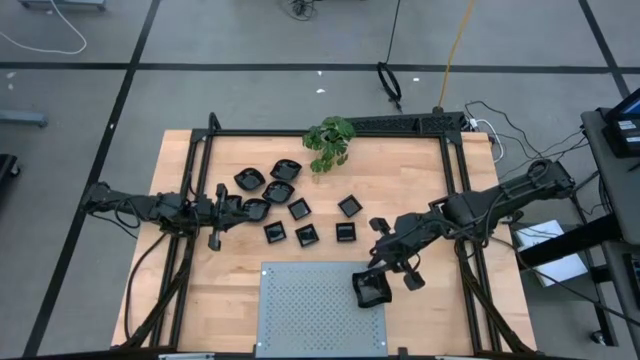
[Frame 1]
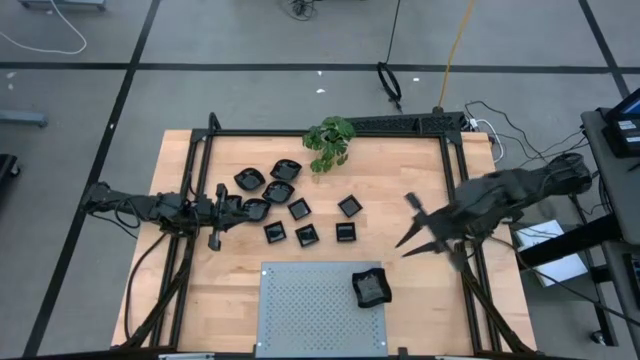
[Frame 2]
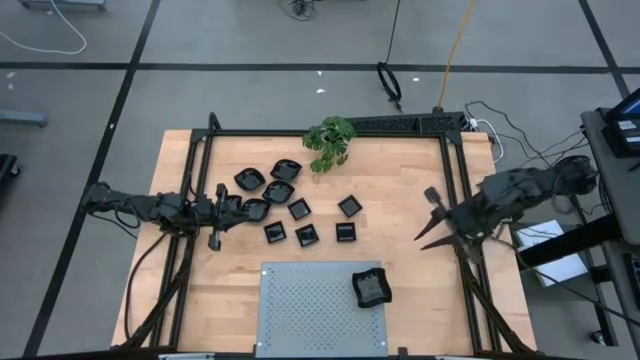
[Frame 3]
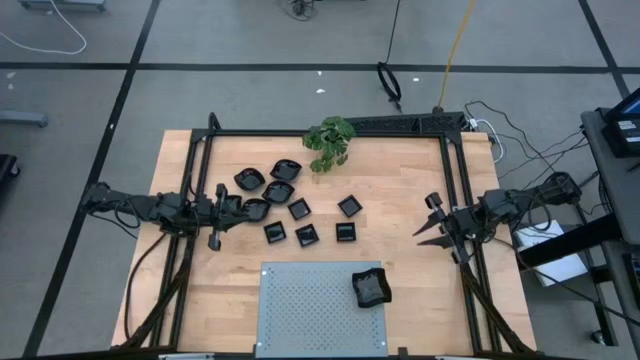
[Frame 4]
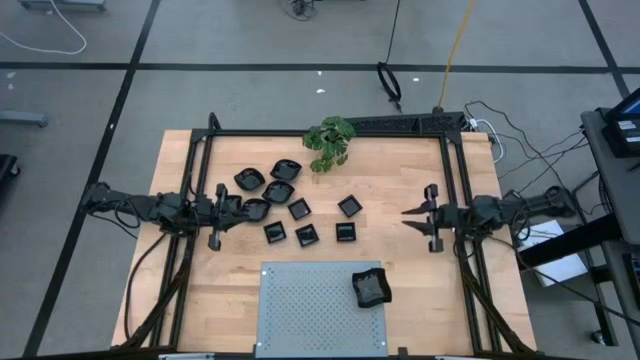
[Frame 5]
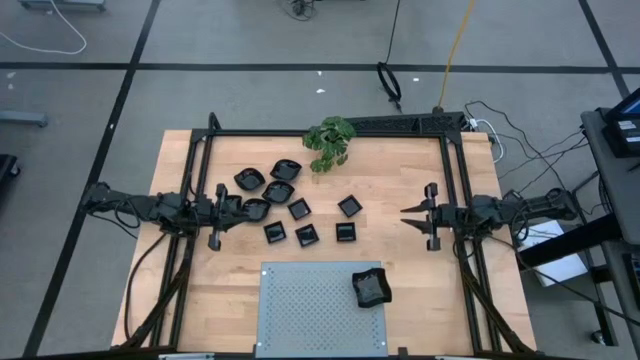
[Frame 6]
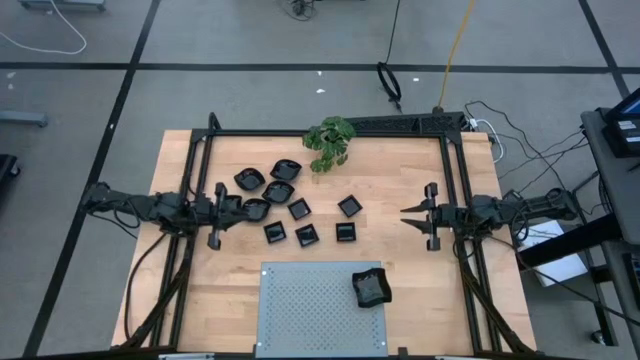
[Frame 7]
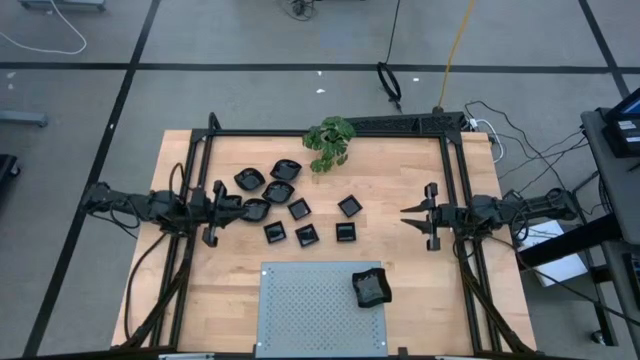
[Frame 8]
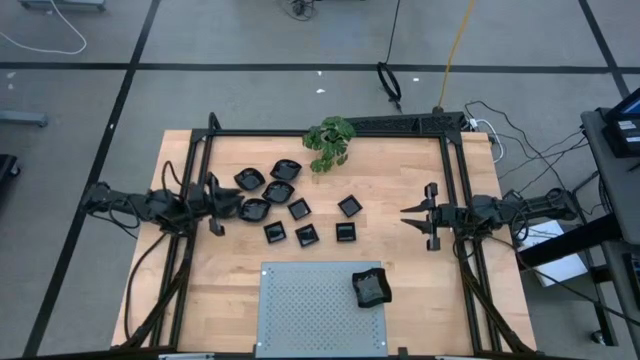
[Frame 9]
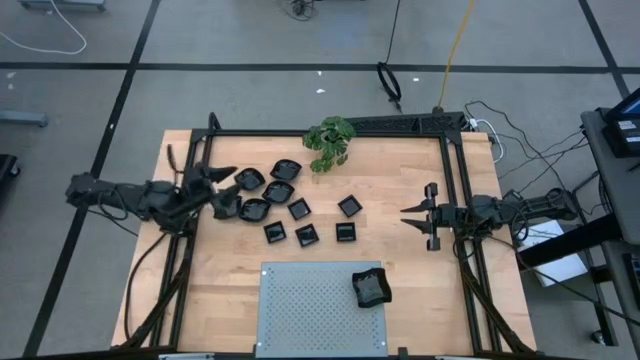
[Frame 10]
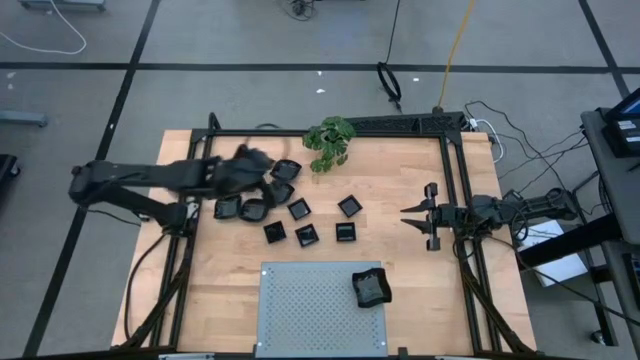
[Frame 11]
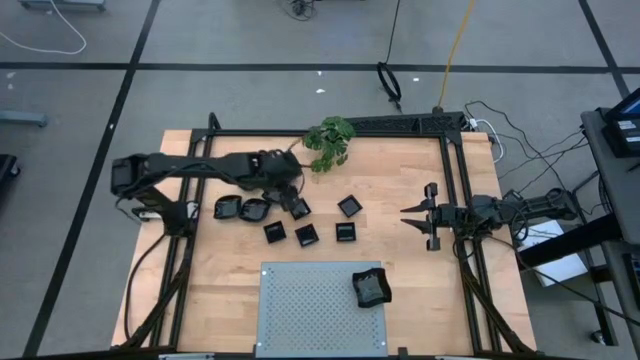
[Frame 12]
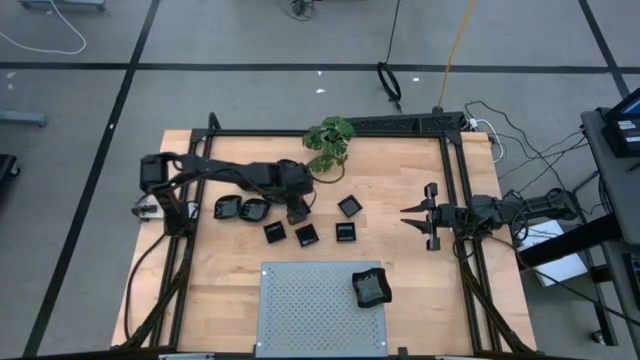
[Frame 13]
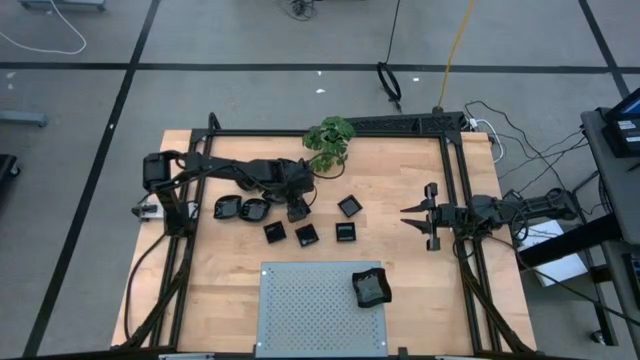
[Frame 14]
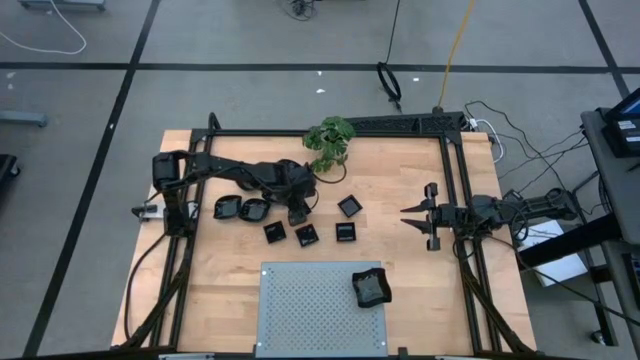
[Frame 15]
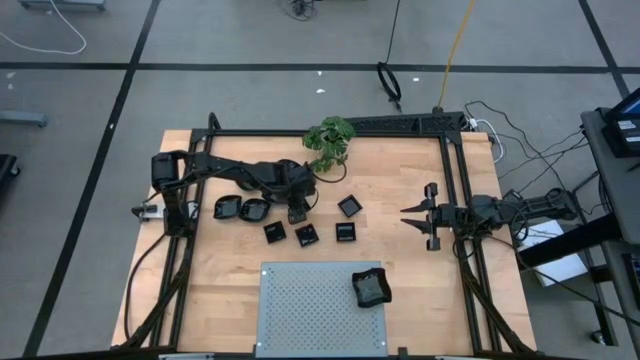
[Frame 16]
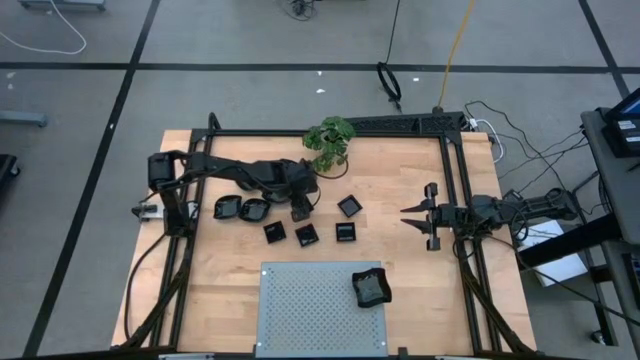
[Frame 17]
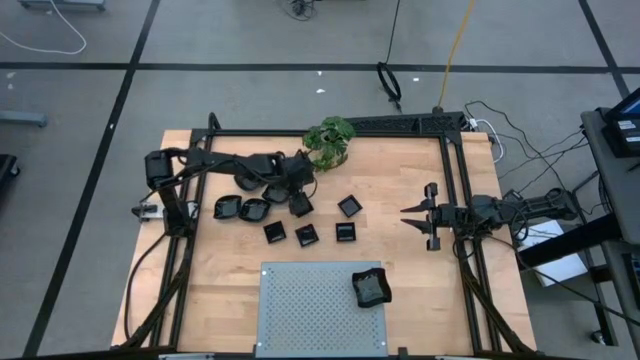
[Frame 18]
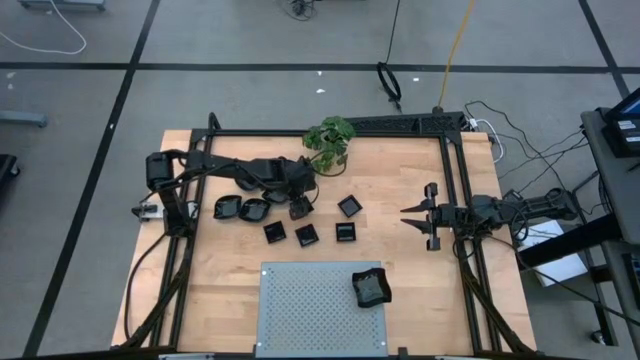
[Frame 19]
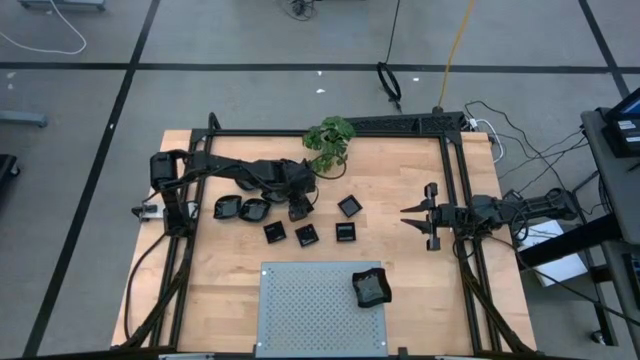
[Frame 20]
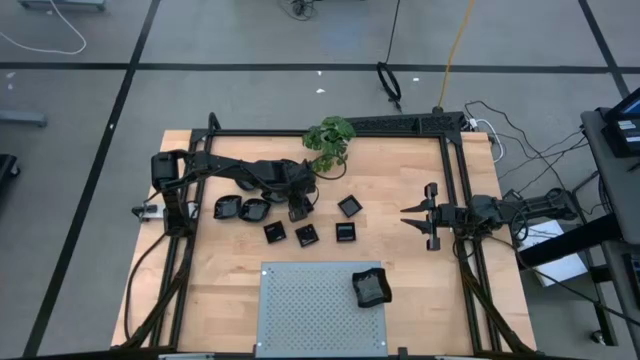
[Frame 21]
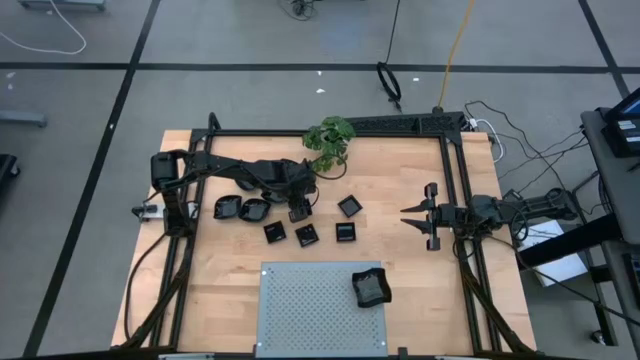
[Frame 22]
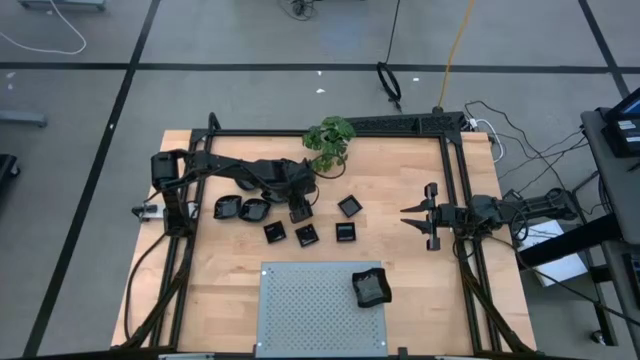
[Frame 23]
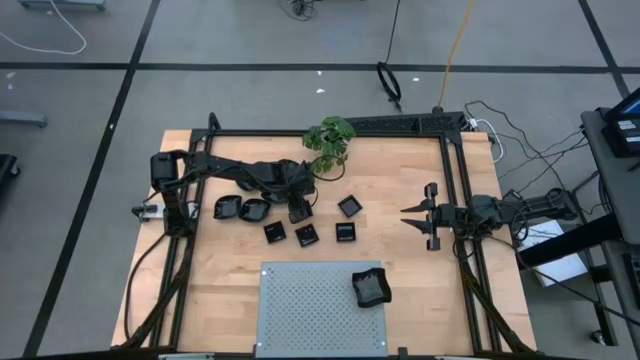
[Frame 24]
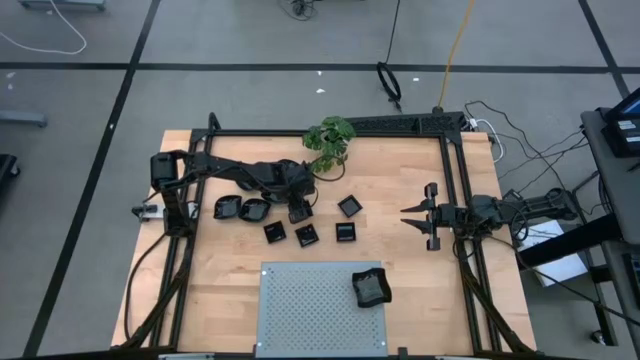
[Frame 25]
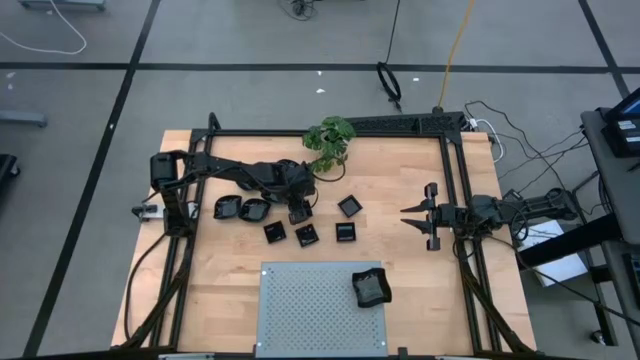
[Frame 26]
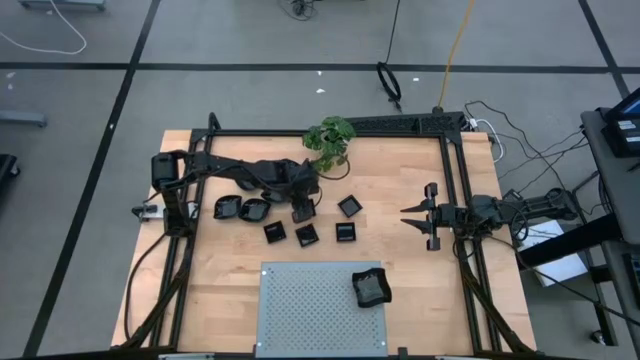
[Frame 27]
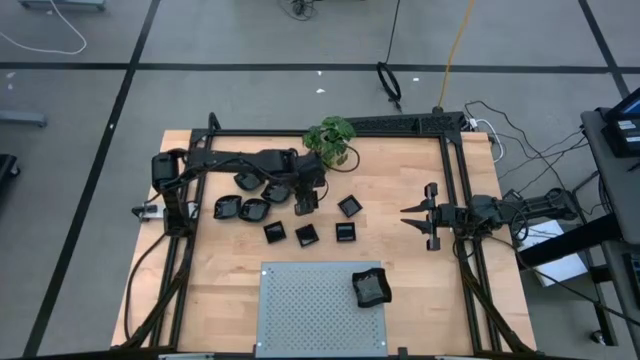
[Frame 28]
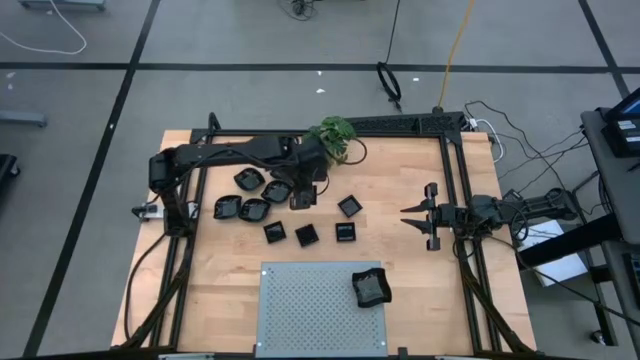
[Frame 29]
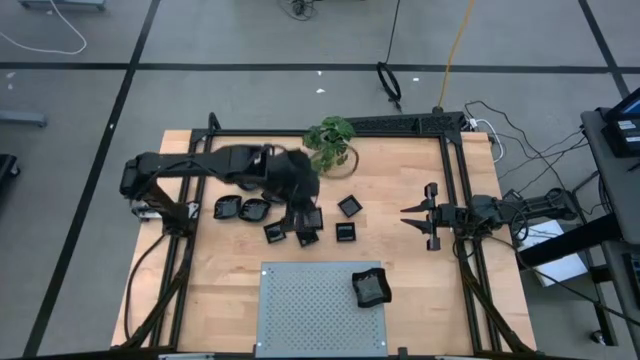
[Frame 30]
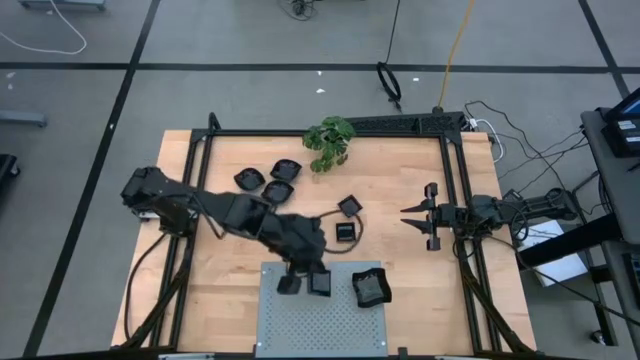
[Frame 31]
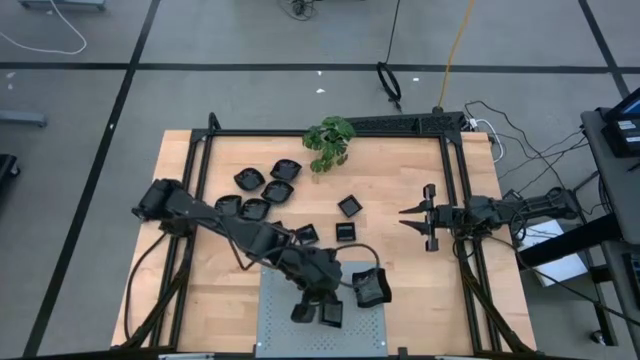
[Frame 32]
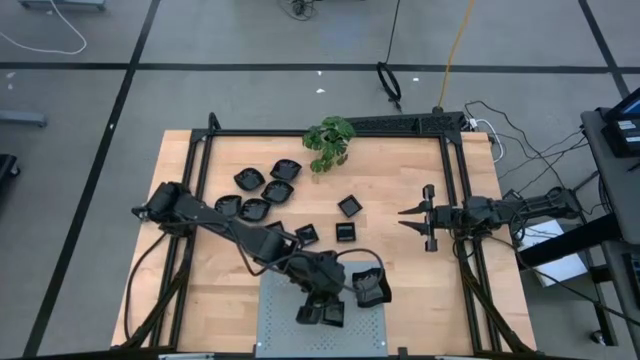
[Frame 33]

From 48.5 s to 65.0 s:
Task: Pick & Place Mini shaped plates
Put the square plate on the shelf

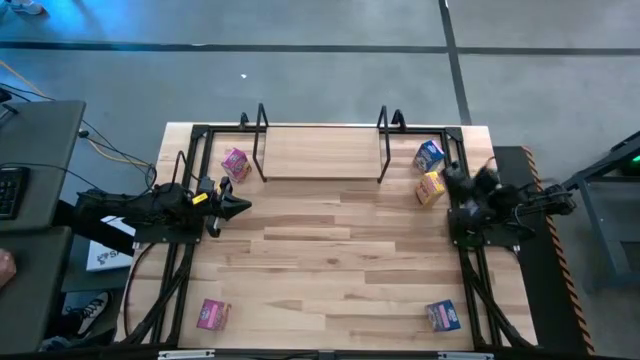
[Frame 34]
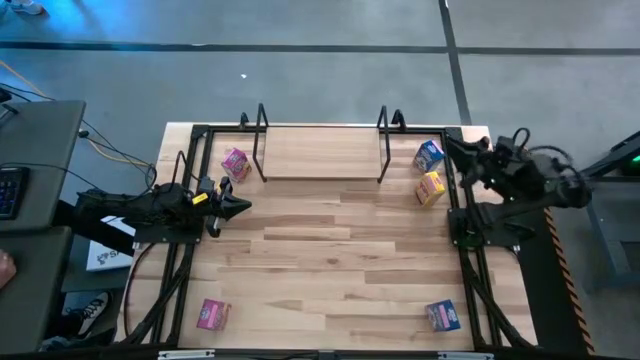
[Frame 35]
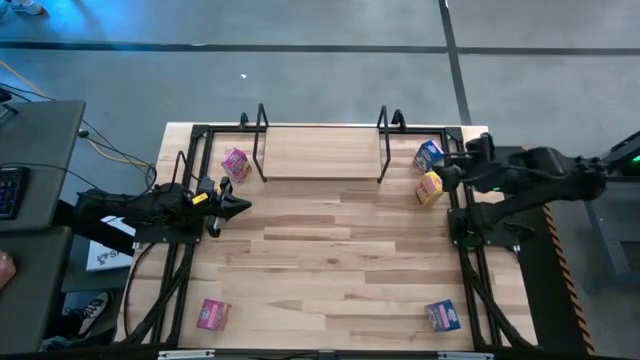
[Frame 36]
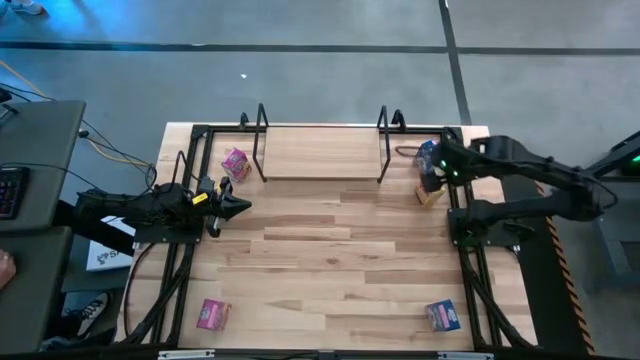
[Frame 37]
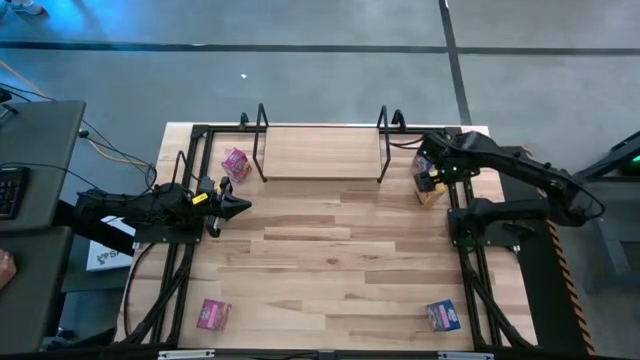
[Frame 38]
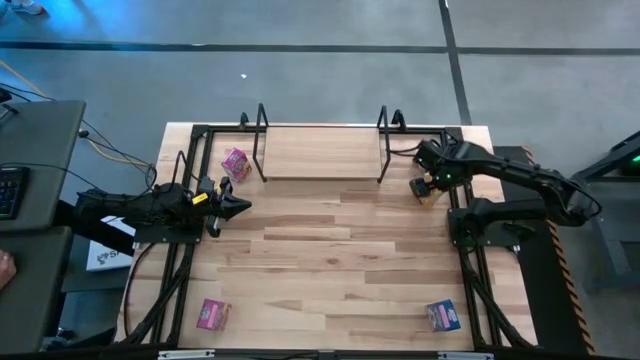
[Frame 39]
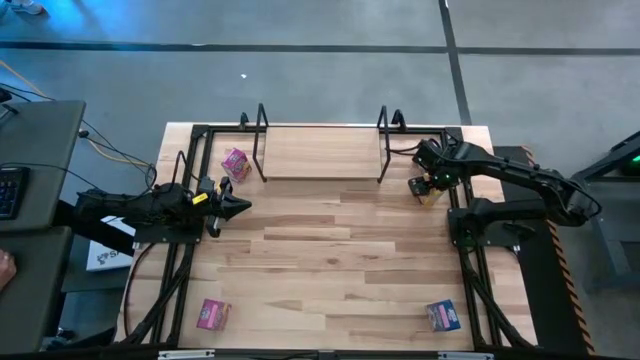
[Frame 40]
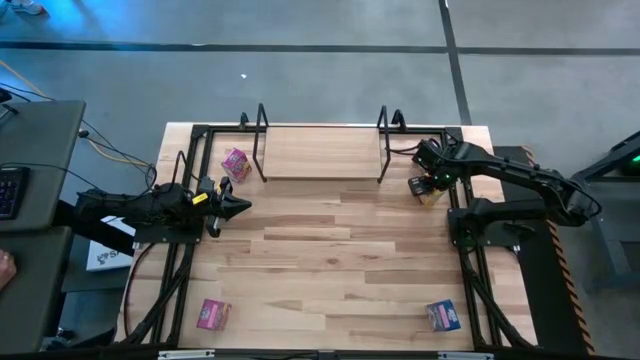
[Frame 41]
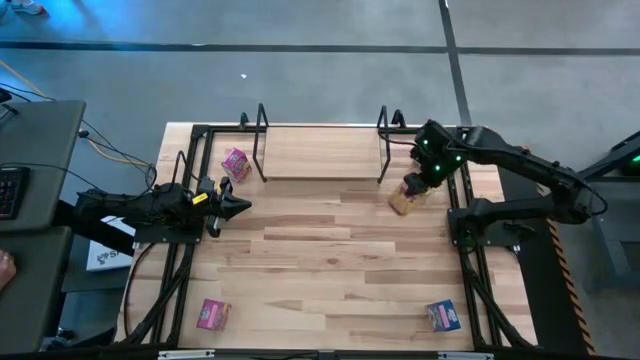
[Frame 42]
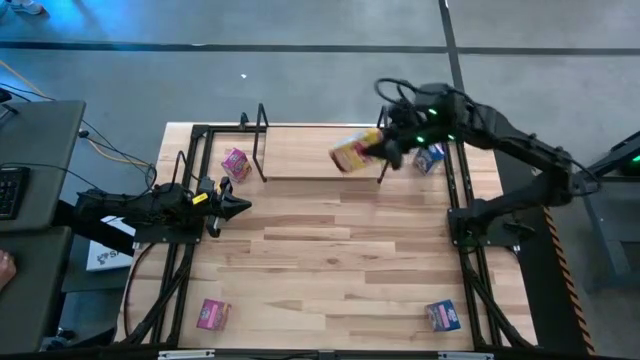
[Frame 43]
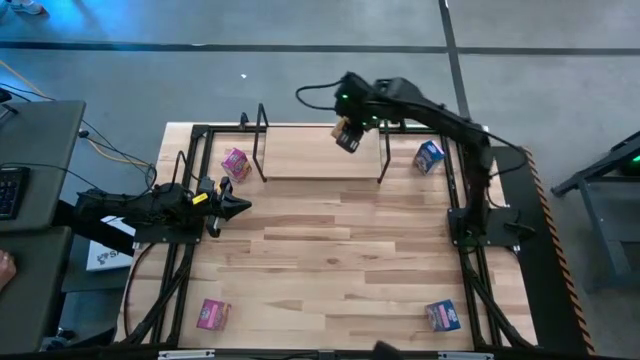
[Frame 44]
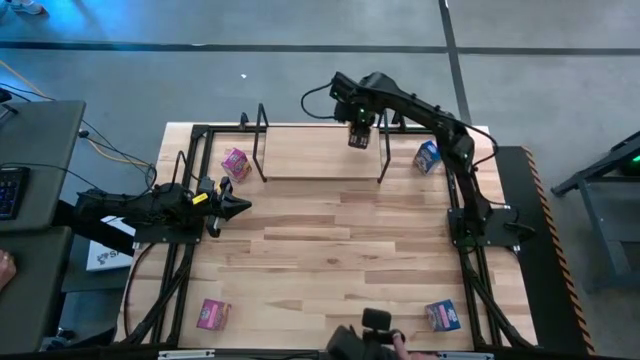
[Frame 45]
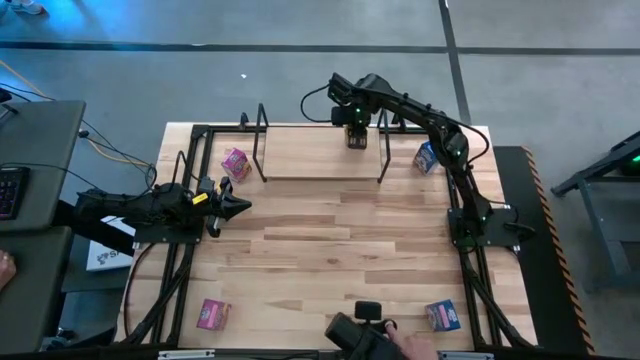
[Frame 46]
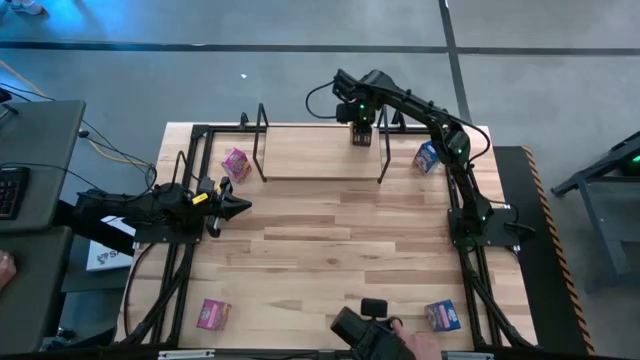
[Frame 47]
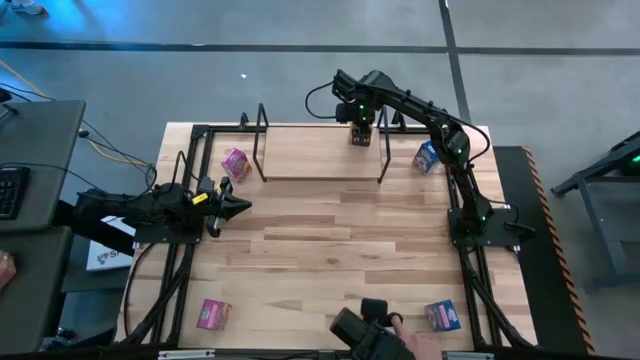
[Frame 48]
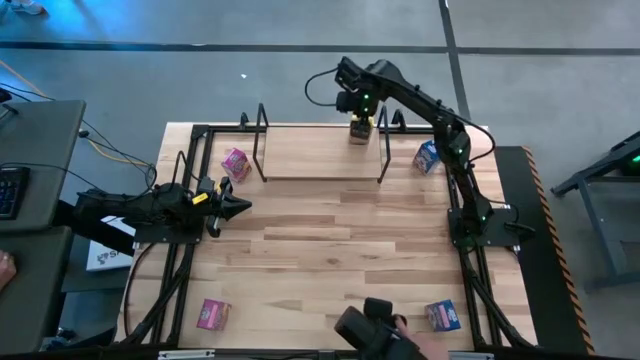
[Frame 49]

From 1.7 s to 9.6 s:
Task: Stack cereal on shelf
Put the right yellow cereal box on the shelf
